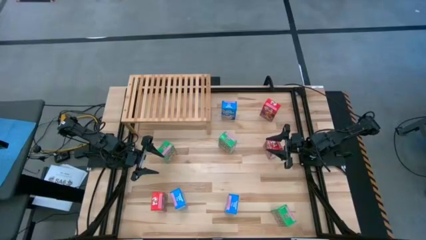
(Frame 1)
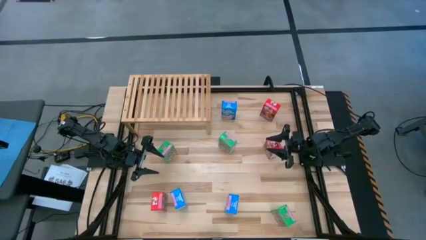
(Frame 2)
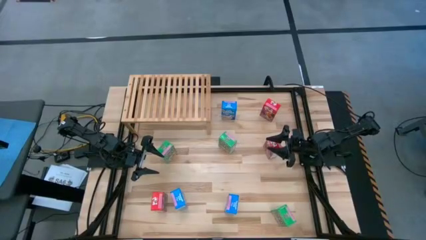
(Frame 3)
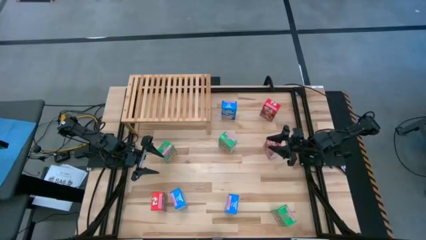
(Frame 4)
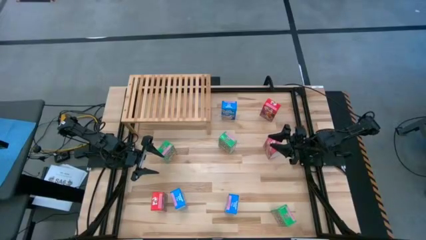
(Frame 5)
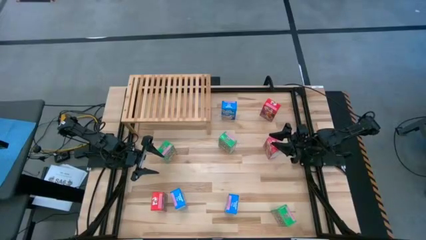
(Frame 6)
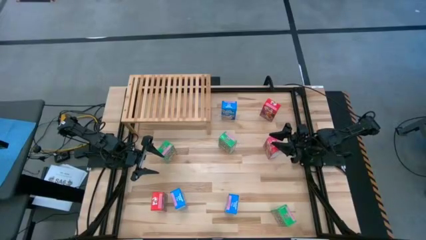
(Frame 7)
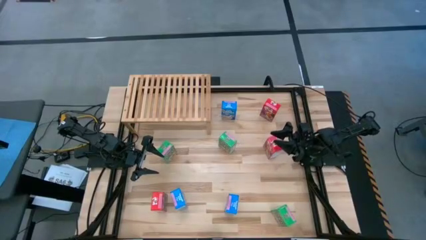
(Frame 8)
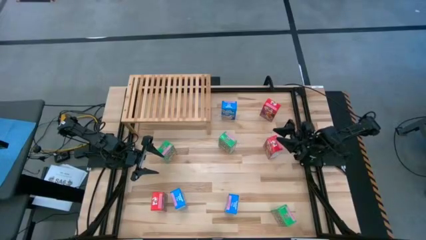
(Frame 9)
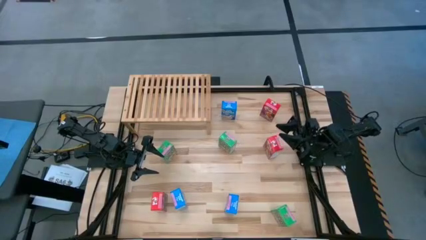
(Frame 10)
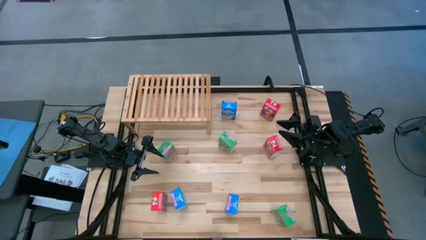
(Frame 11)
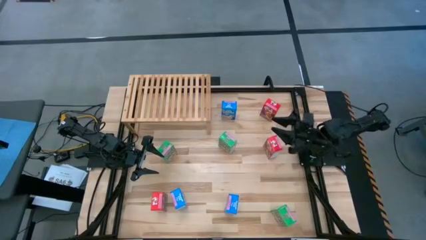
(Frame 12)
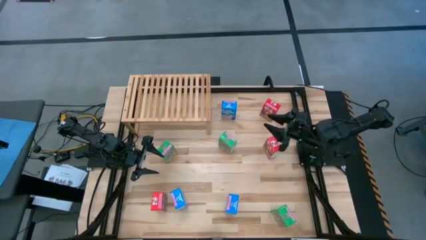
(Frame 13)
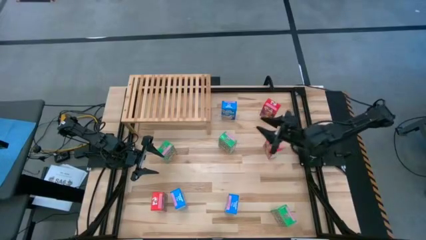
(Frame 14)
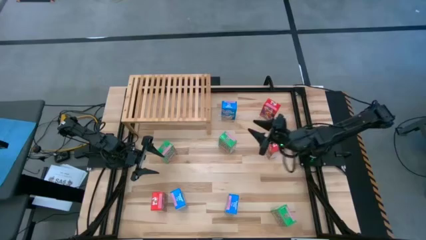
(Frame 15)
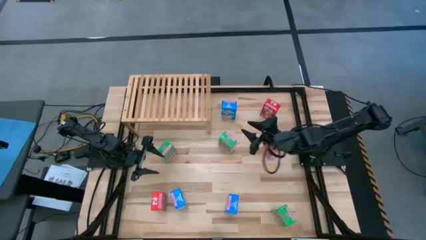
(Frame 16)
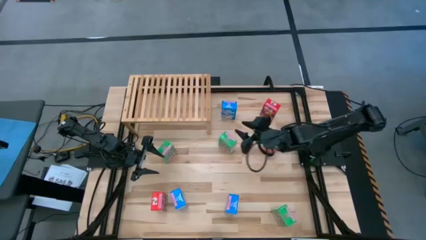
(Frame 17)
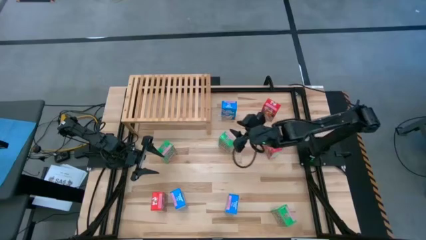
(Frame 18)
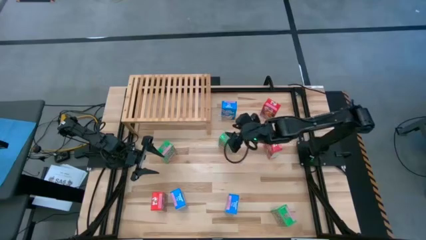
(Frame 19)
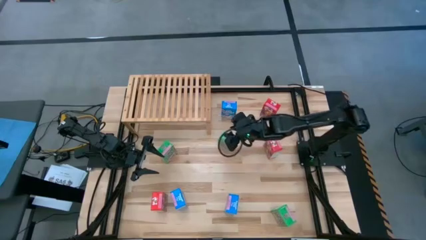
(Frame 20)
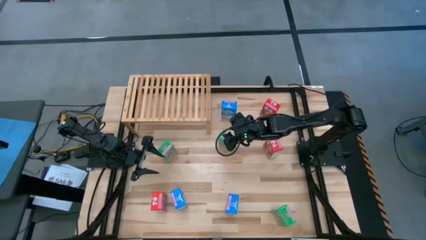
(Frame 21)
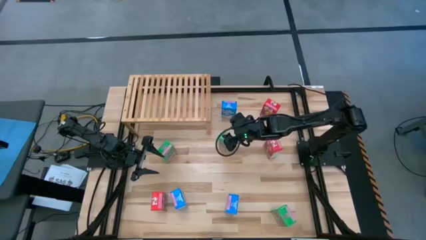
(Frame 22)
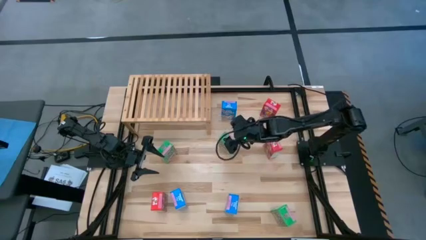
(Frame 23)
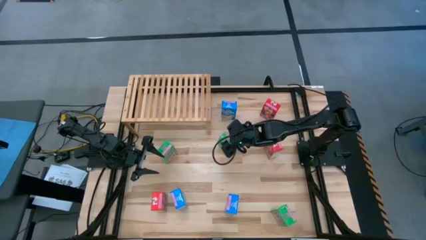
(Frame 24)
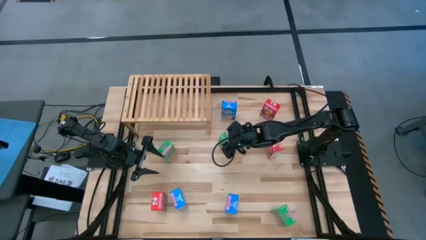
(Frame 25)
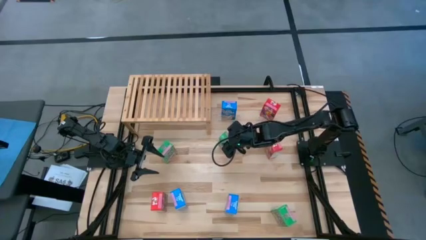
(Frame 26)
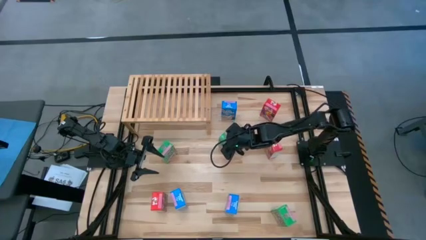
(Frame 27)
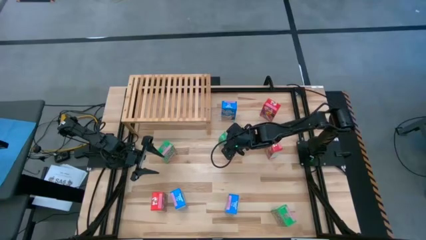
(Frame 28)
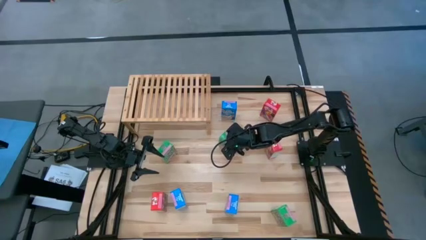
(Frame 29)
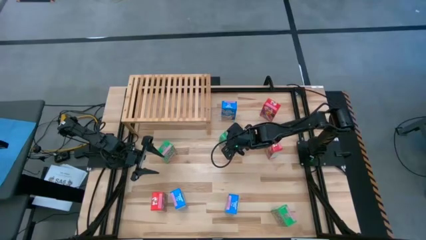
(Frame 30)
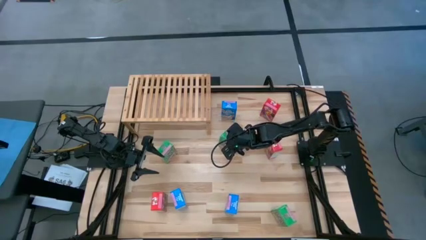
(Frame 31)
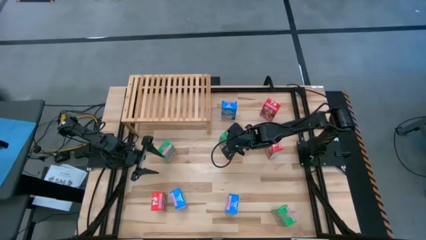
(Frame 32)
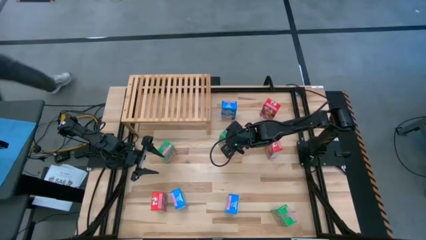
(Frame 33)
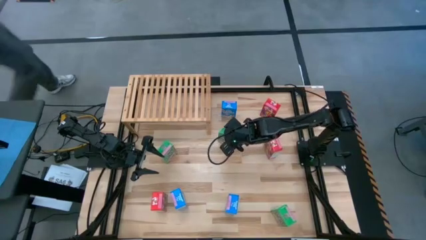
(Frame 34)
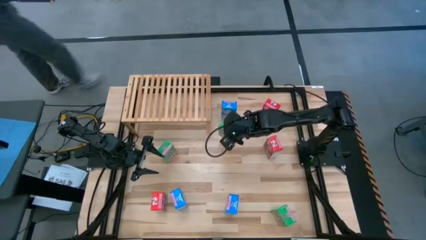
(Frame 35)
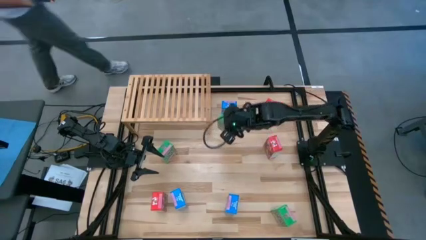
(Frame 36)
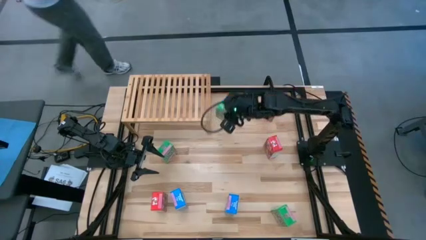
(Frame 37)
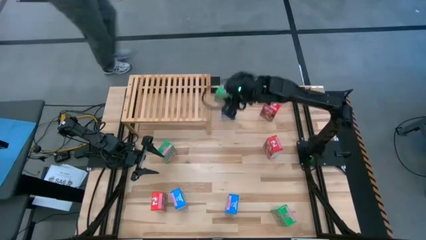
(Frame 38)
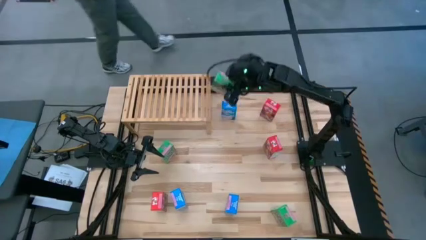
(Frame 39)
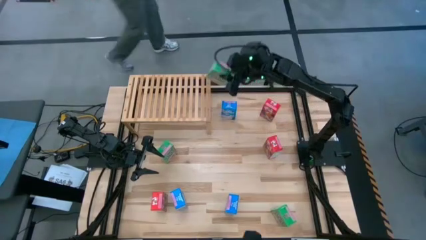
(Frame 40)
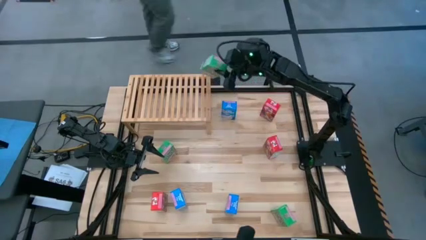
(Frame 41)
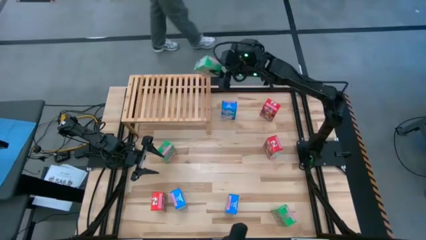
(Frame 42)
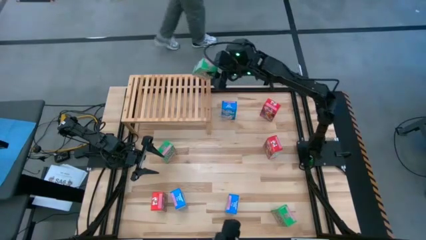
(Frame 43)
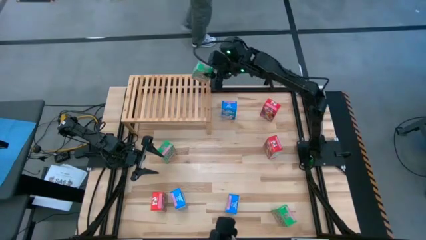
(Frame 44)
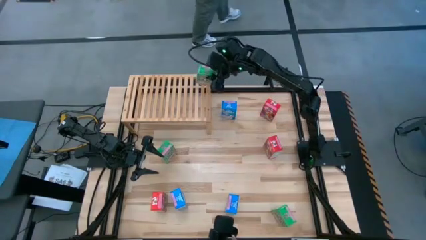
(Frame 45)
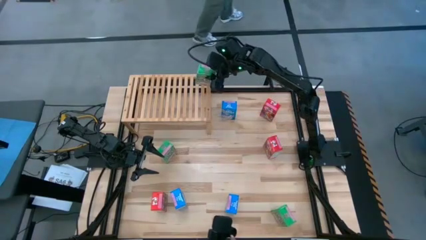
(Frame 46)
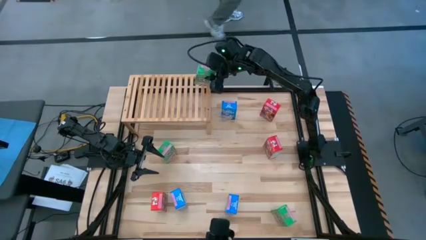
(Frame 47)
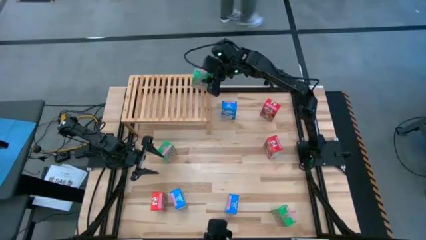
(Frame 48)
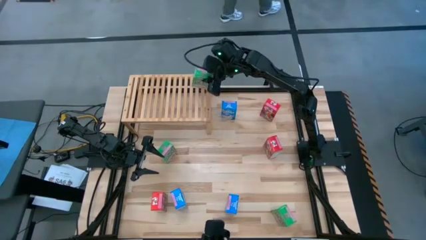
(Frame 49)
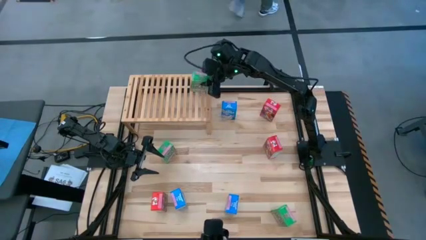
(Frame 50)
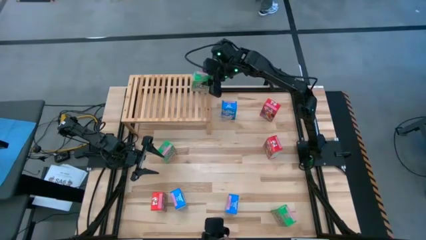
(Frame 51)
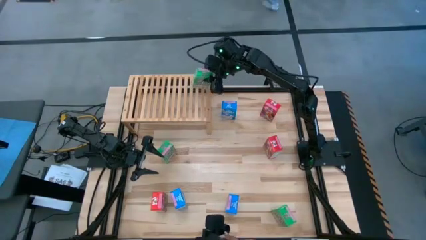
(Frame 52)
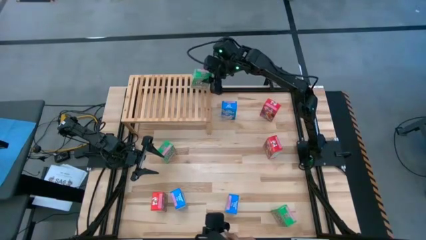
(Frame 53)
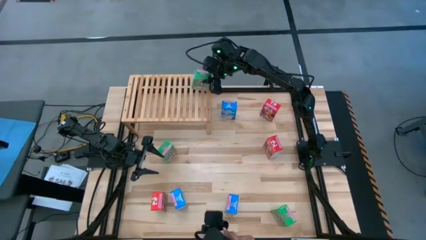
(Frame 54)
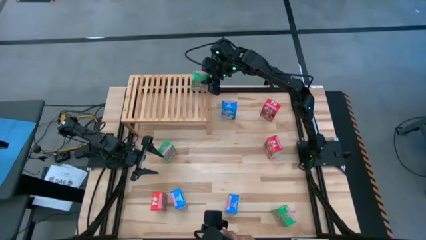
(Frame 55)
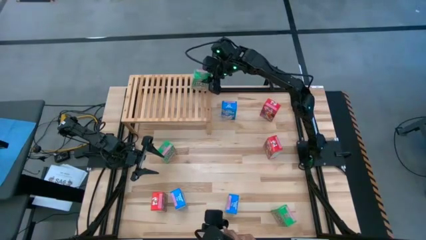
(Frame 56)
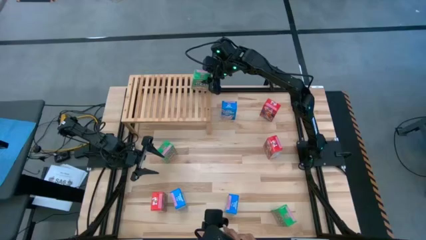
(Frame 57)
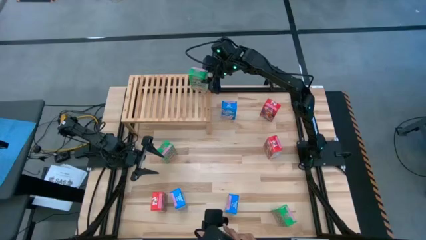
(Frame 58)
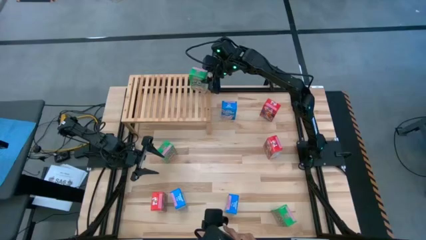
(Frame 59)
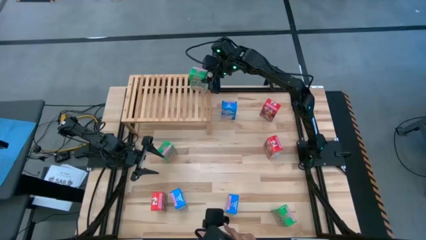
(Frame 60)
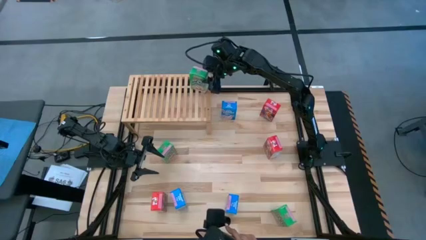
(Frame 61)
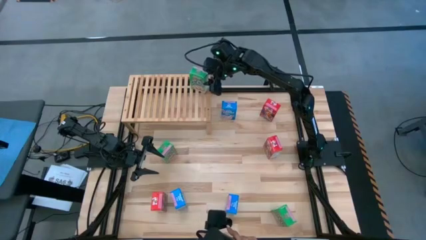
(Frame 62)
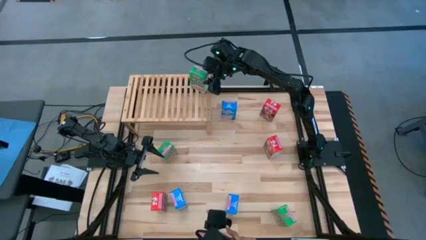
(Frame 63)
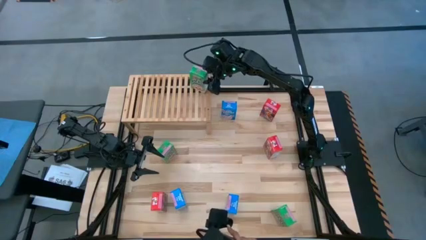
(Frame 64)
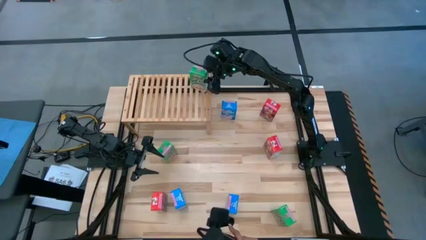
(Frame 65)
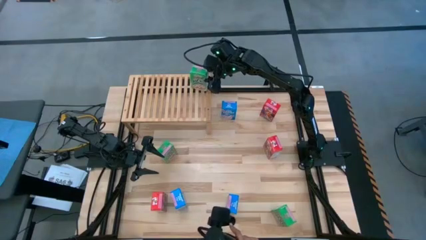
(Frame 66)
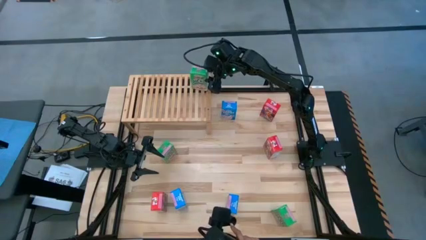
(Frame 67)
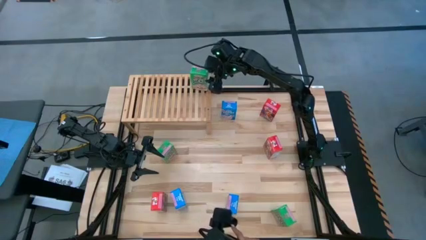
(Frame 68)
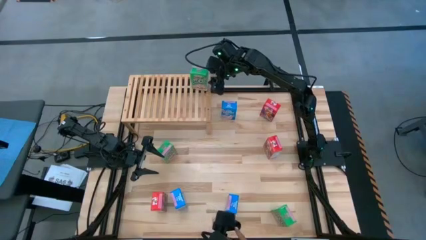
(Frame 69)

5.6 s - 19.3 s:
Task: Stack cereal on shelf
Put the top right green cereal box on the shelf
